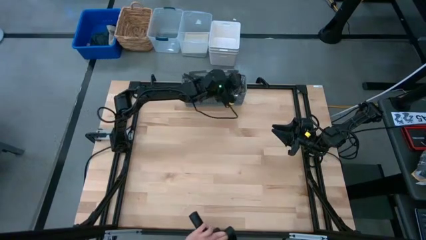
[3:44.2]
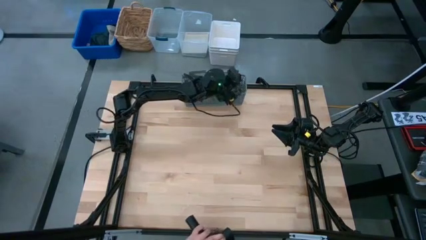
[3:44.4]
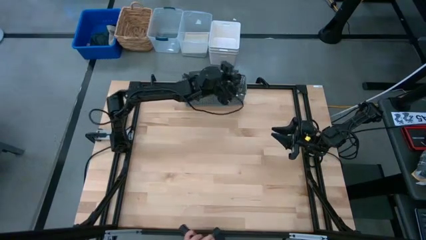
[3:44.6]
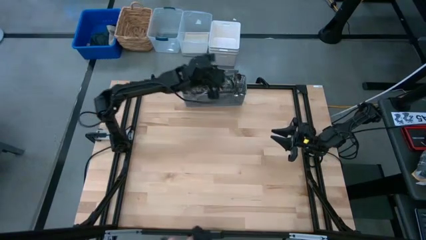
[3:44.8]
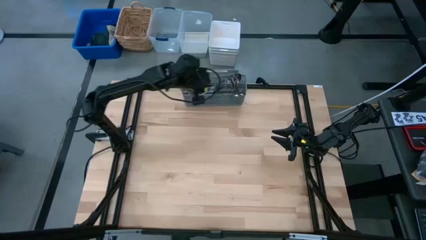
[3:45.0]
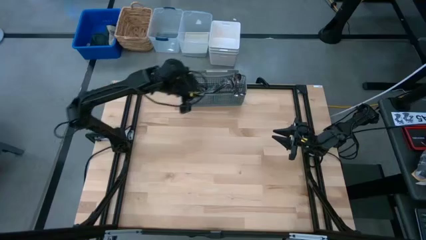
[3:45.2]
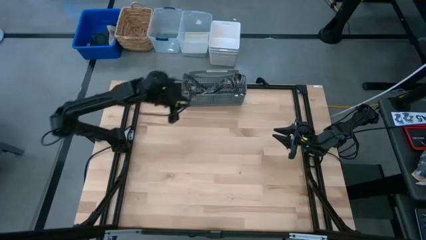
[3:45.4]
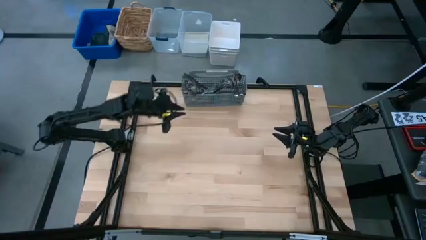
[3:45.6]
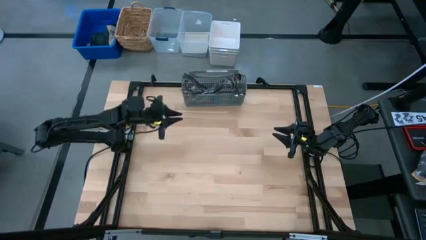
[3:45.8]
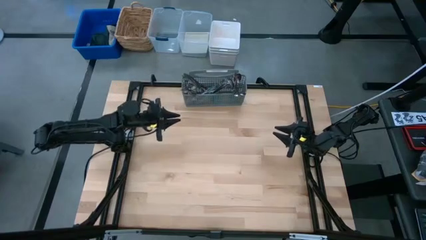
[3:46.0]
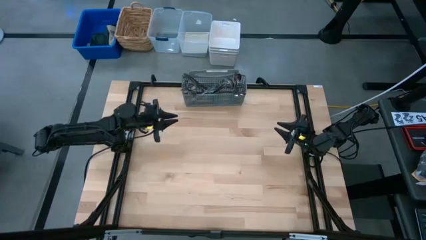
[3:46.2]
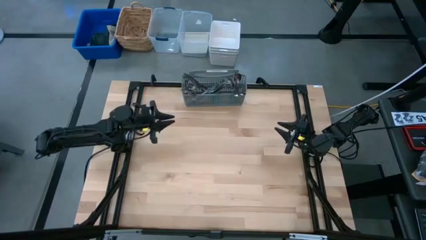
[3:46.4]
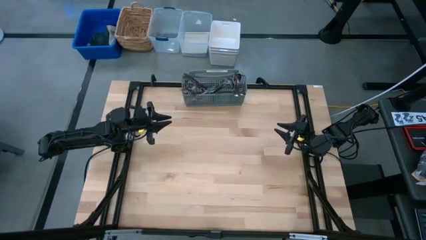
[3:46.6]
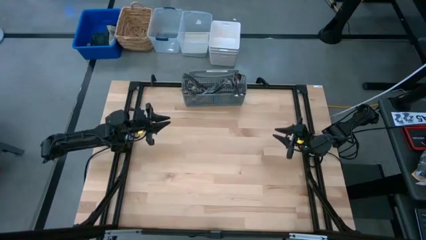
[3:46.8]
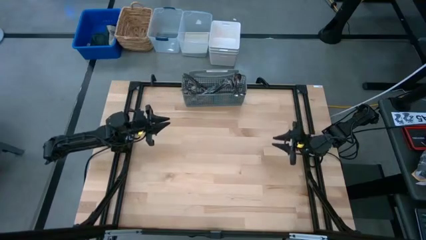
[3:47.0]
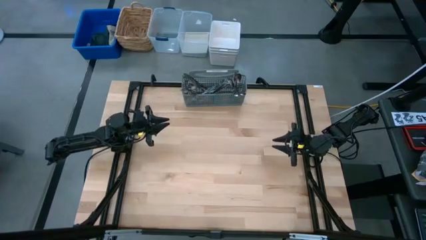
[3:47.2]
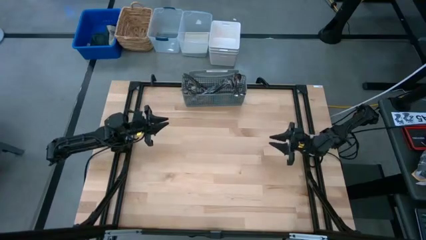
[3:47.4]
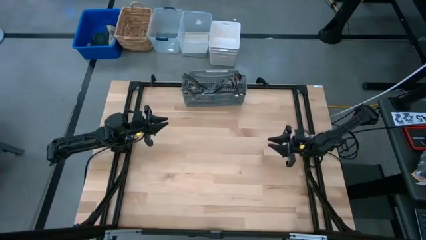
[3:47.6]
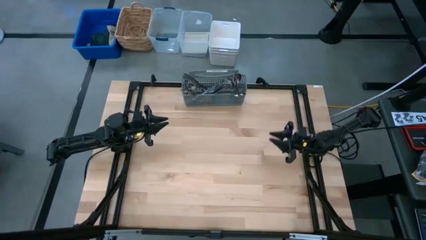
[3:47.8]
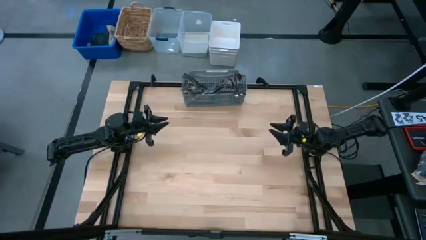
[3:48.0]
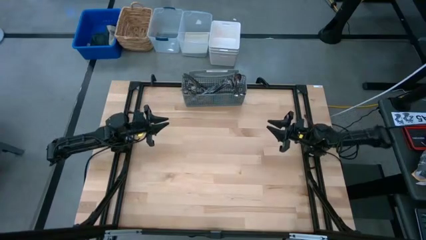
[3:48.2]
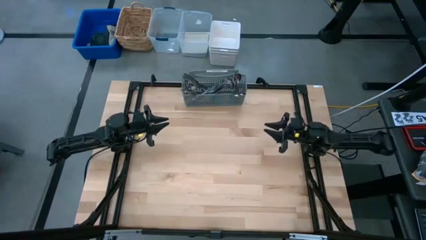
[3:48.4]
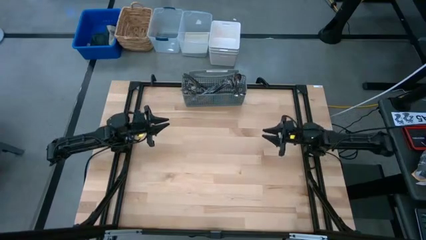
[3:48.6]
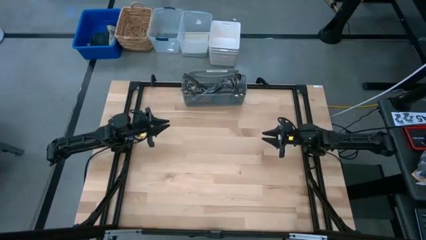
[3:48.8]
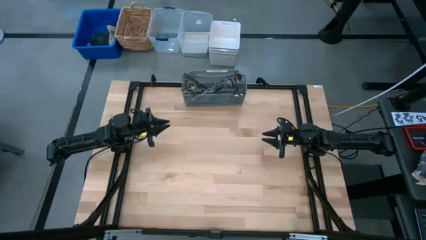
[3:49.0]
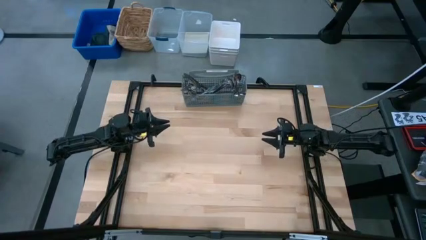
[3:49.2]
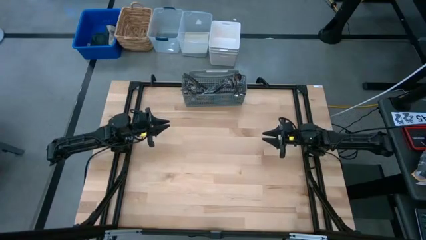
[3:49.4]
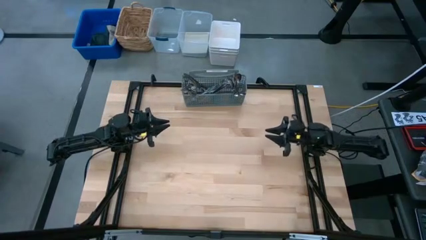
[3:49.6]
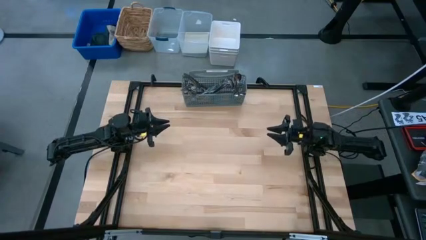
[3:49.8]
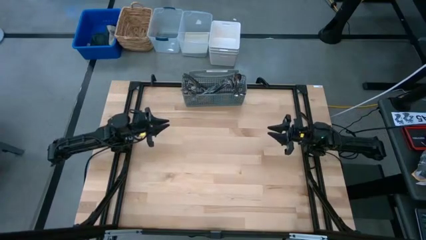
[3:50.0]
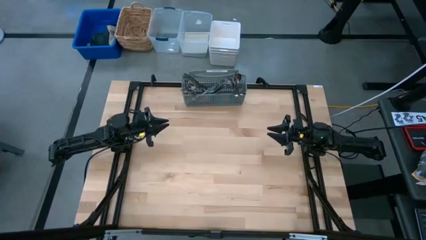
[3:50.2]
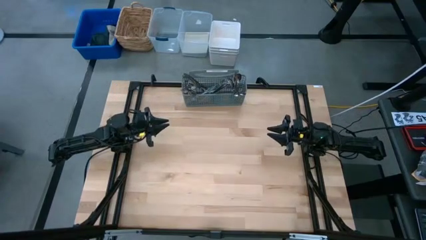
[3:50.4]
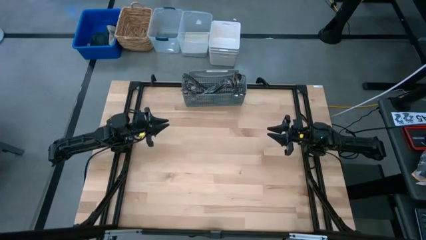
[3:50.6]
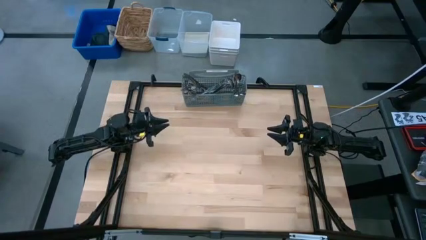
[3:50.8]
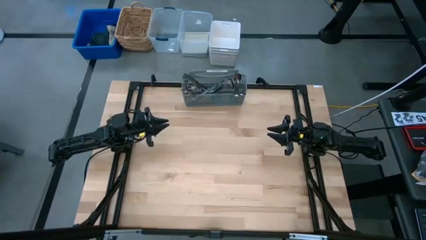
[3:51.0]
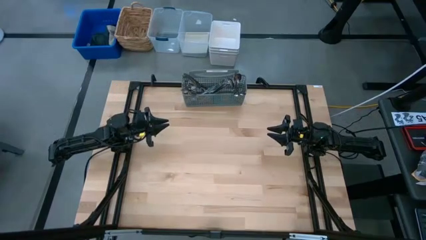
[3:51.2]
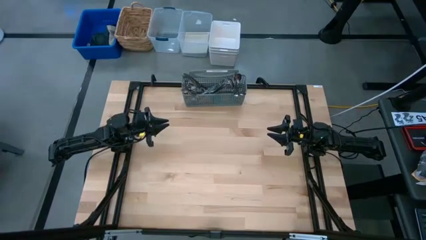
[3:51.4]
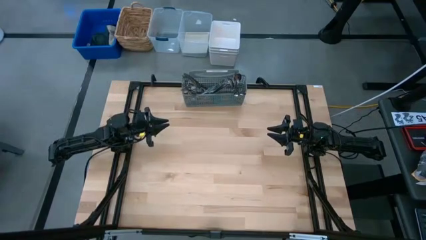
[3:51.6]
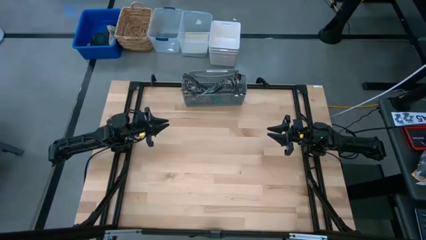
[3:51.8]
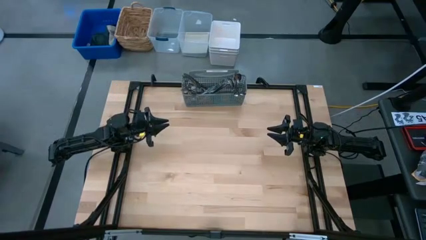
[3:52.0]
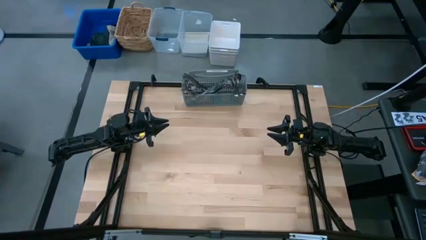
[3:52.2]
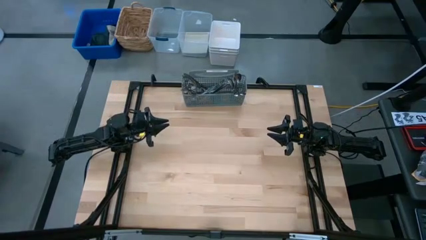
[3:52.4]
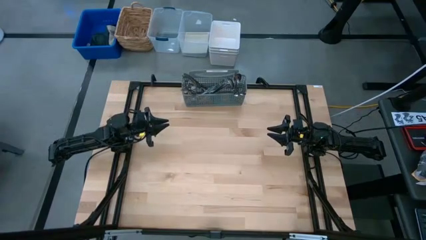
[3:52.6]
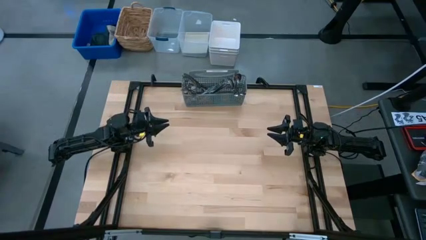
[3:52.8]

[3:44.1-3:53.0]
Return to Home Position
